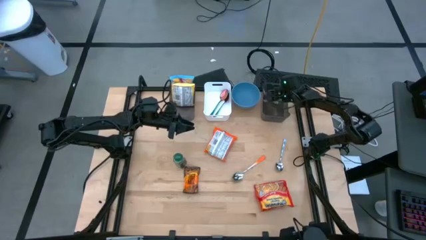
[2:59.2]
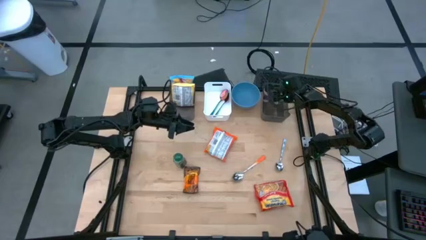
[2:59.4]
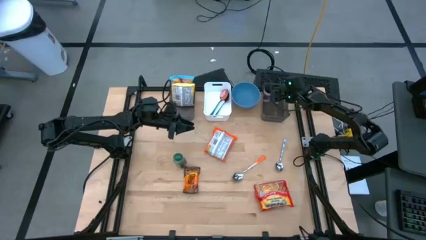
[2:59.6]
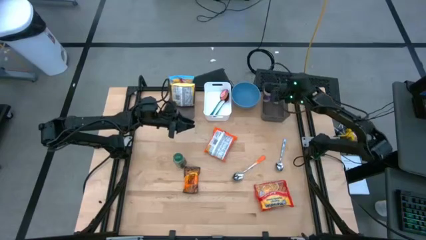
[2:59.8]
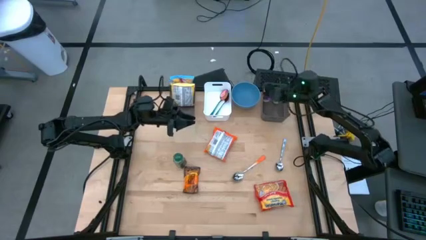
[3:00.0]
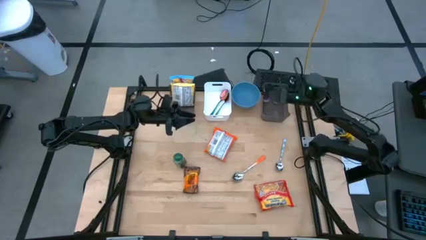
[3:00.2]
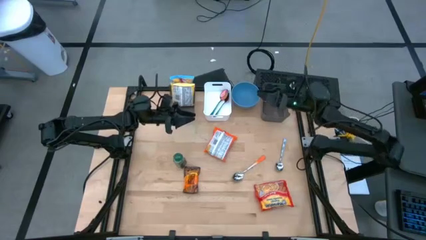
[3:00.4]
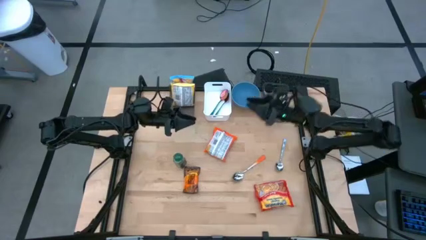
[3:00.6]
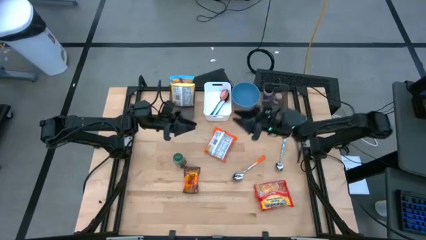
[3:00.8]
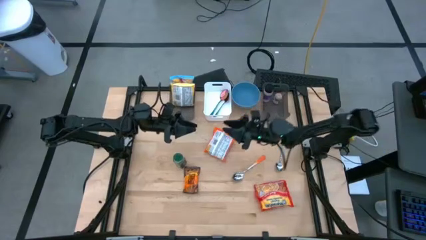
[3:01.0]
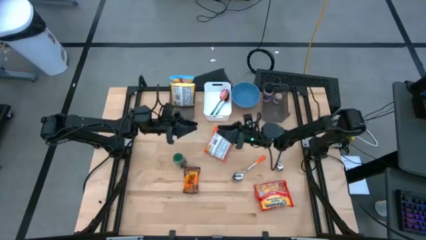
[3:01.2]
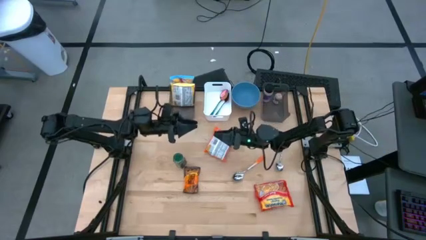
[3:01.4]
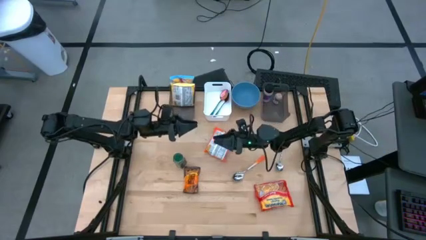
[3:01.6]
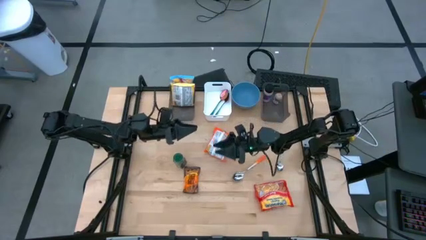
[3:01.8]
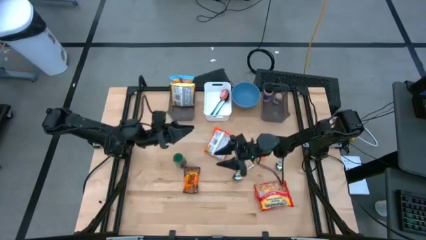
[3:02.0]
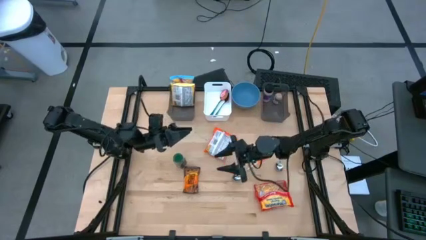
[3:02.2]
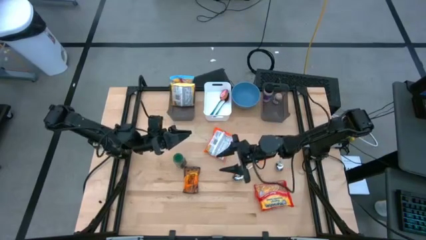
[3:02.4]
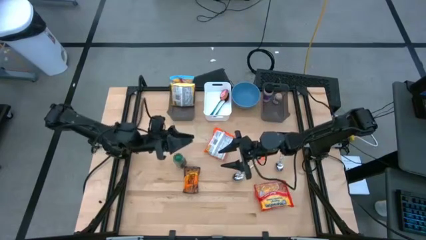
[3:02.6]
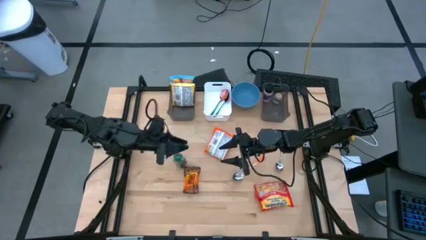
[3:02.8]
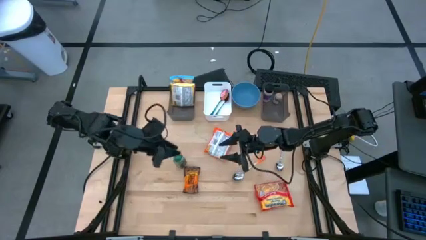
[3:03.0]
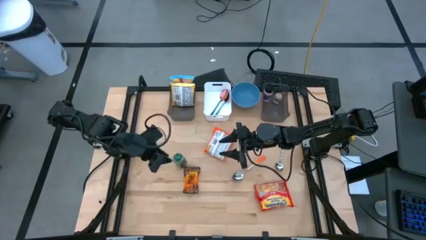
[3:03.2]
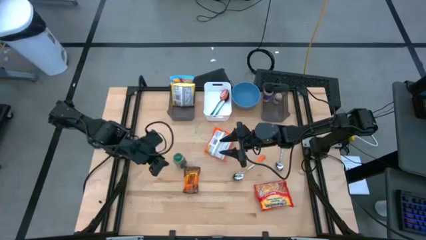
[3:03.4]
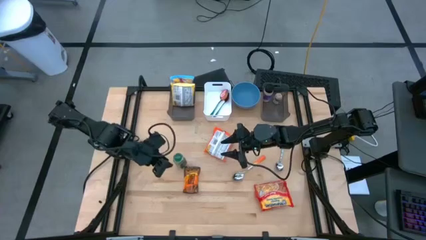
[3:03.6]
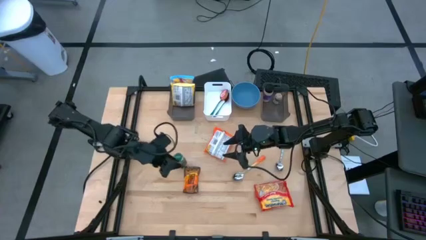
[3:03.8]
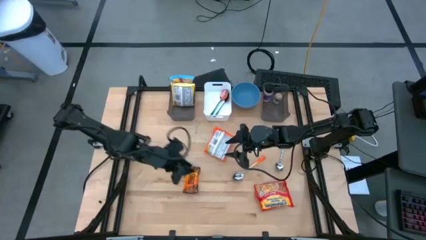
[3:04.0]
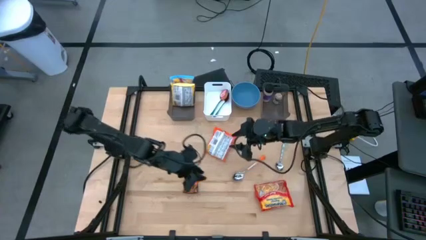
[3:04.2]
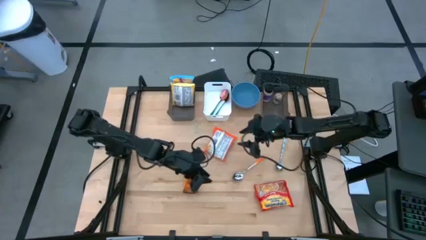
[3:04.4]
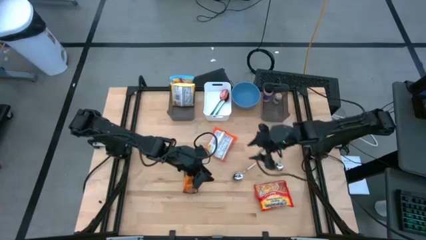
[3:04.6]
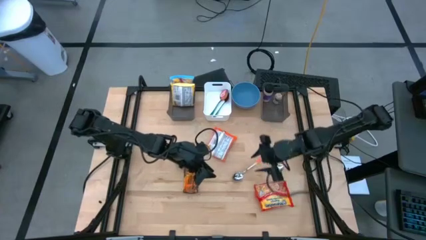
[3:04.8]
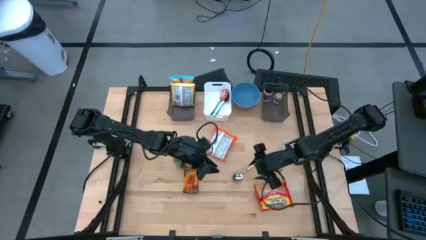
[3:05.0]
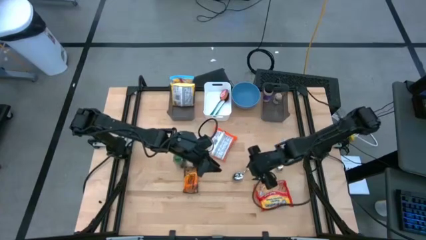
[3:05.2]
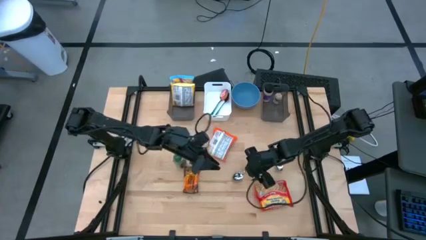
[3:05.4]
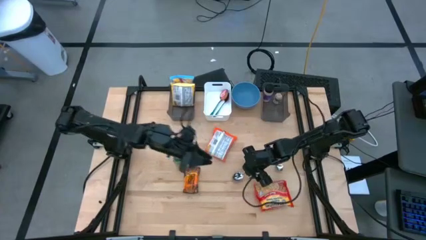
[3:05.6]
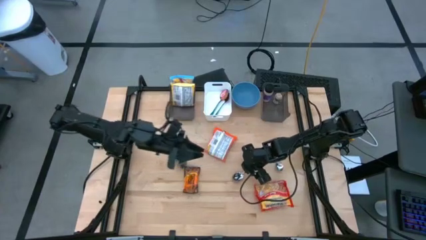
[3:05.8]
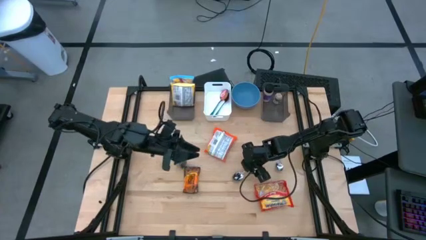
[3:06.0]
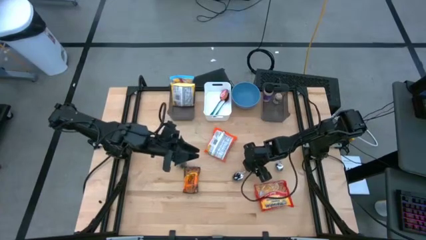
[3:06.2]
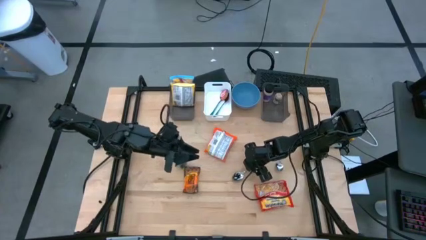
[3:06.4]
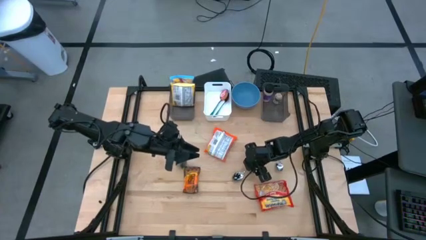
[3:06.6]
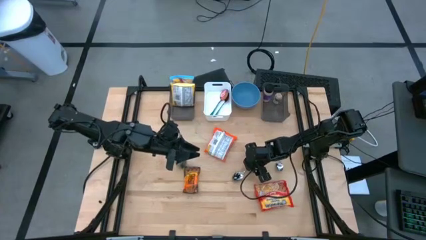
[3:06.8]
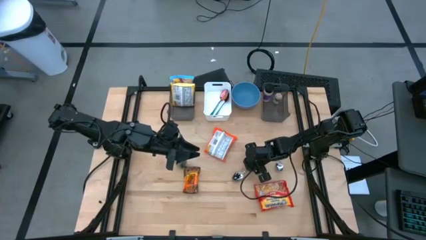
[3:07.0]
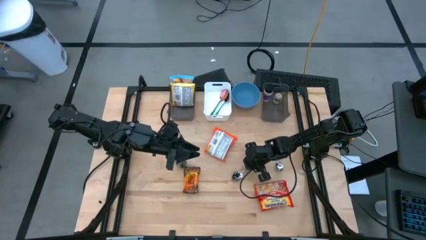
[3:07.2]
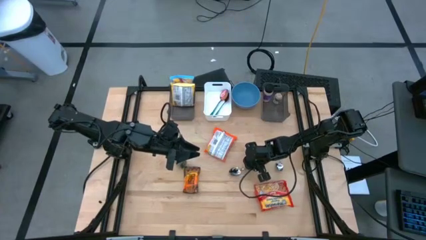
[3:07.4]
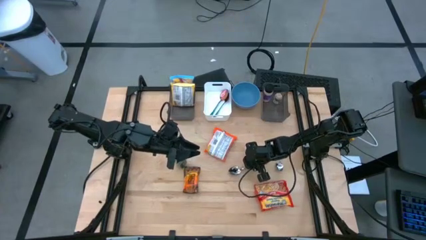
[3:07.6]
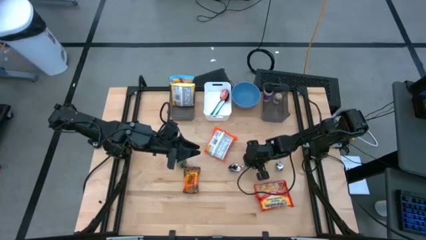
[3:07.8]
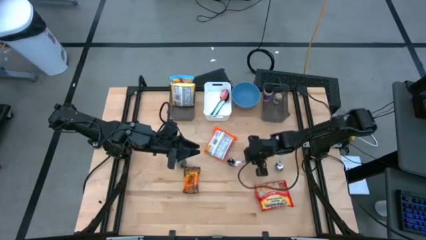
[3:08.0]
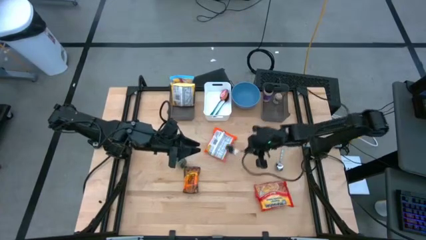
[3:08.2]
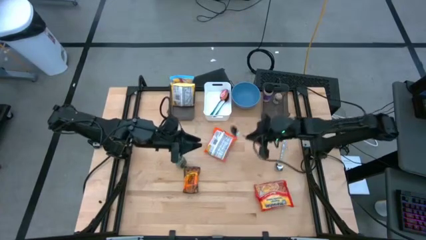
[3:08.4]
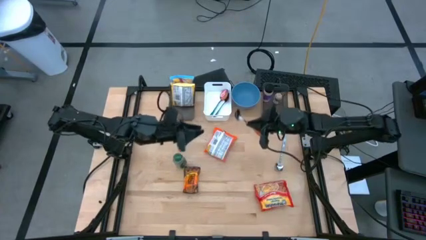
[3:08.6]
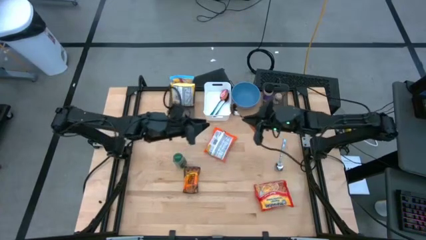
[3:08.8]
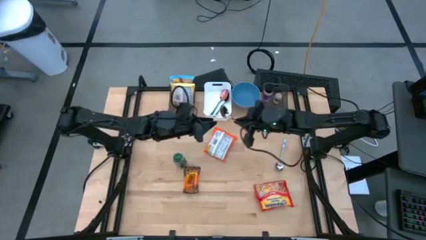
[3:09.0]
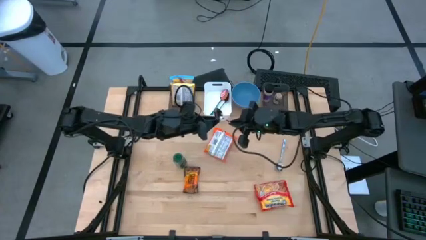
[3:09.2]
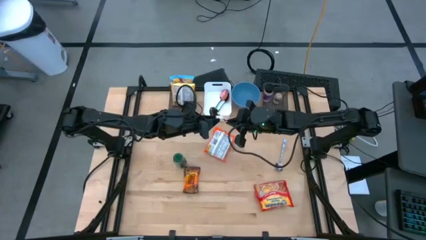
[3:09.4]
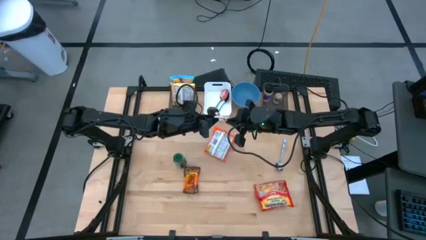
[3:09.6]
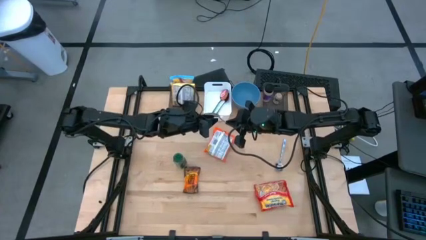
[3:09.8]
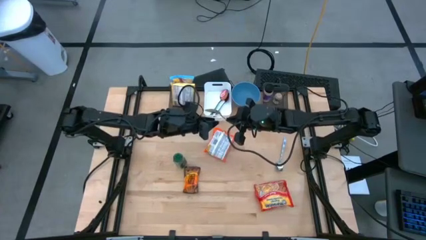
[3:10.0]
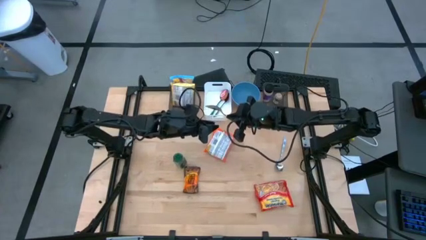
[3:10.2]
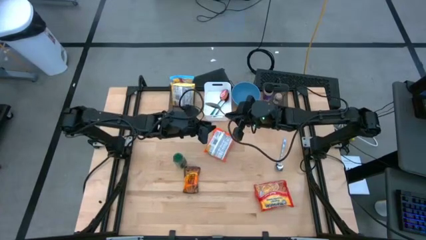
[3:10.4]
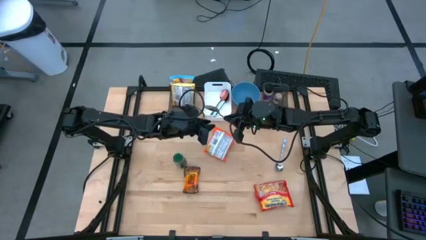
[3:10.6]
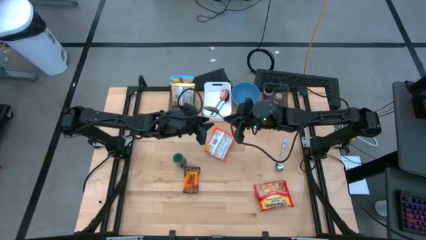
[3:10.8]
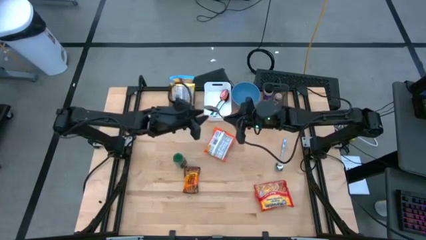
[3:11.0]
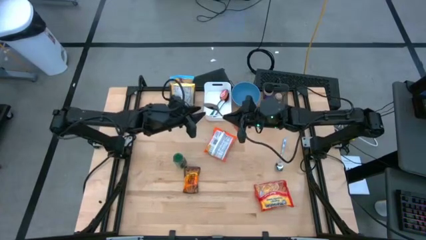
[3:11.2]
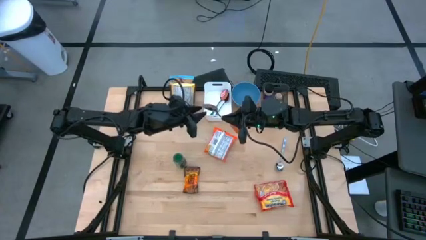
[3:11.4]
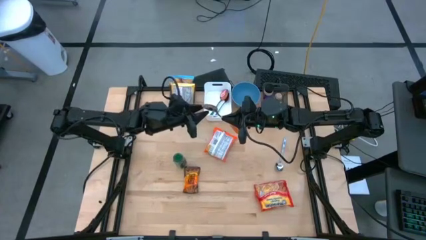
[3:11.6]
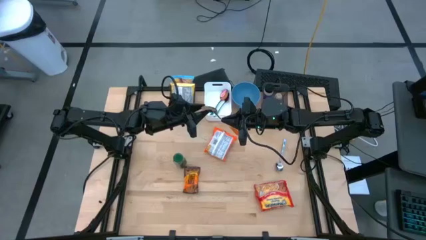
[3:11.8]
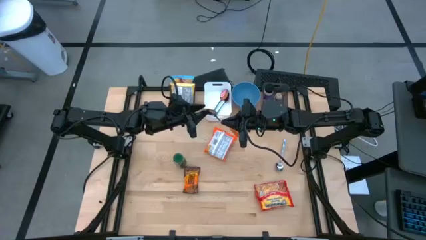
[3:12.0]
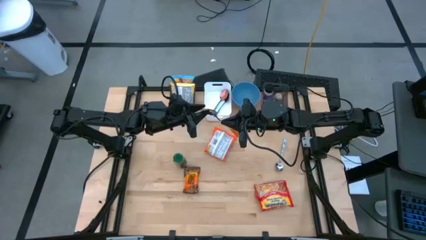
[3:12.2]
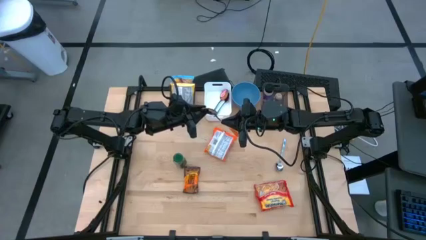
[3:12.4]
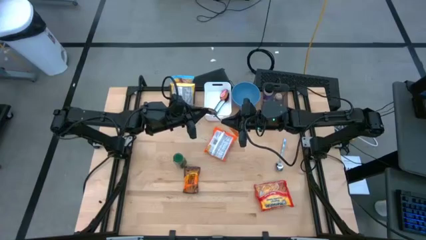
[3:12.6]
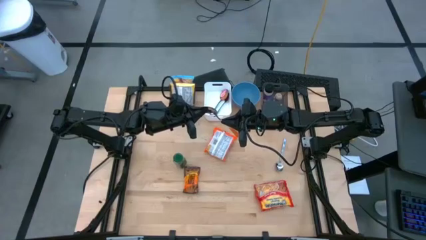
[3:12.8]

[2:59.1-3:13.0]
Task: Pick & Place Food Item
Put the orange spoon into the white bin

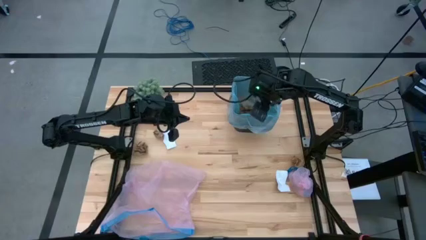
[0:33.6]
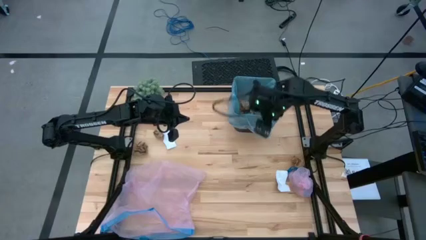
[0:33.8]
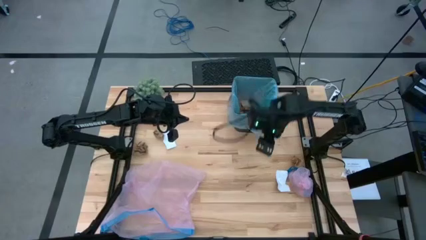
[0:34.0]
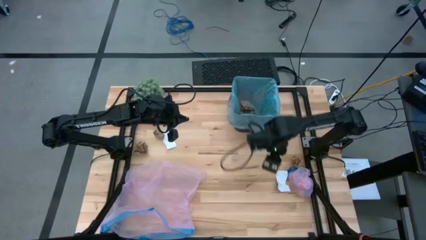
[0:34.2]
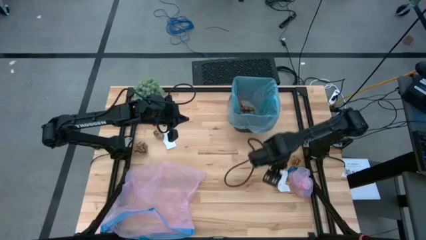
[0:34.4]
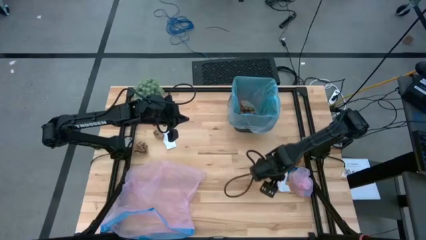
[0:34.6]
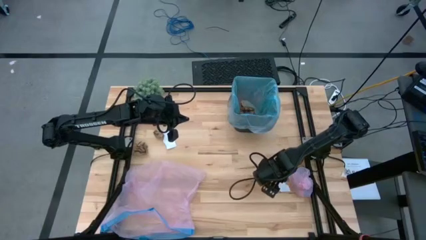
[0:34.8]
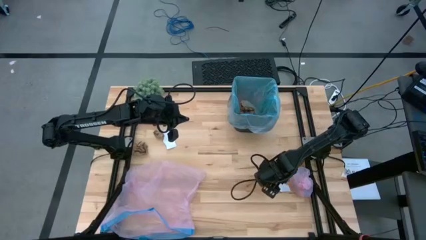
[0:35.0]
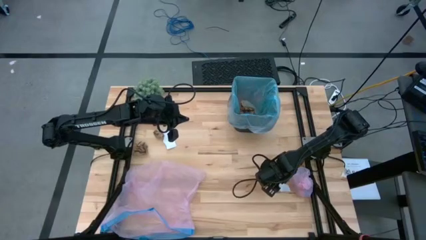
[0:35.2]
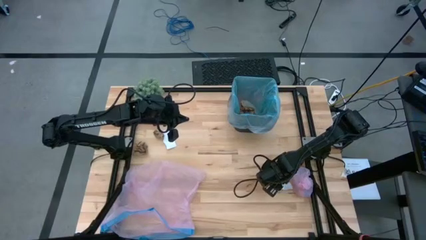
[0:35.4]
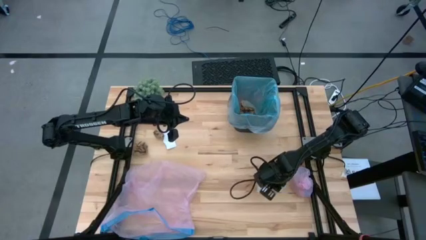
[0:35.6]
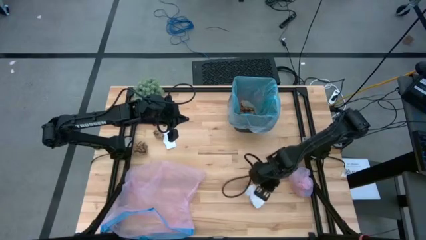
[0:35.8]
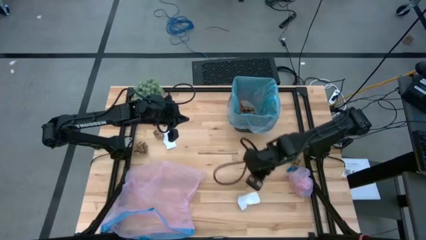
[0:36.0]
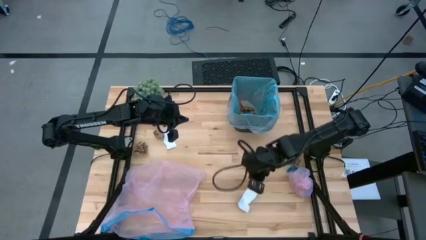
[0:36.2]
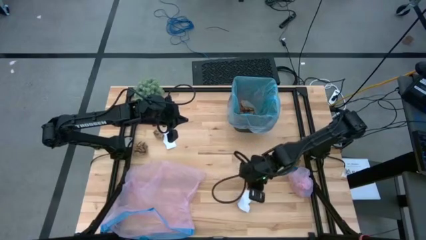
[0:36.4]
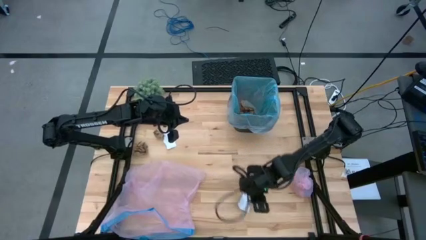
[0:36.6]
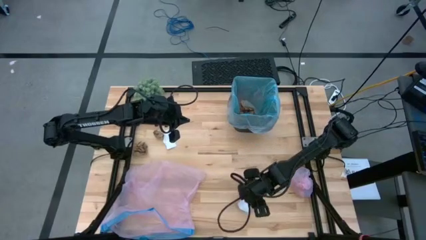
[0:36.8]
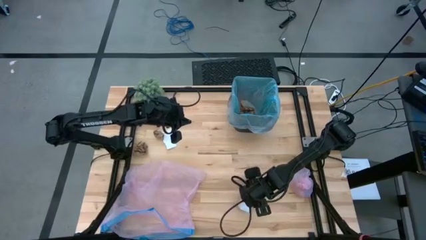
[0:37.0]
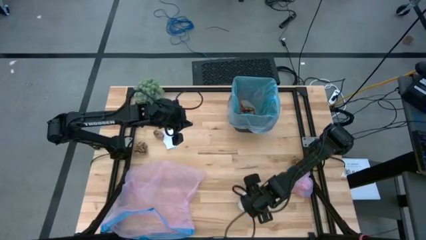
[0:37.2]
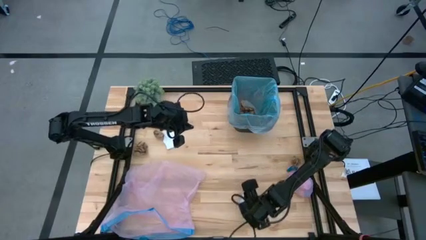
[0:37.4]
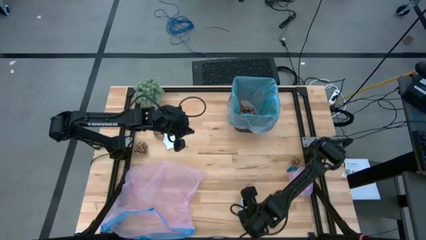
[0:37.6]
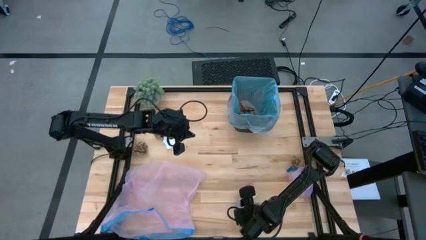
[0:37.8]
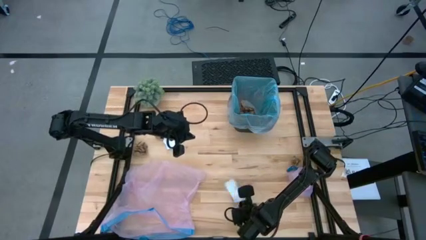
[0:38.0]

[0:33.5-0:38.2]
Task: place trash/remove bag and relplace
Put the white paper into the trash bin
